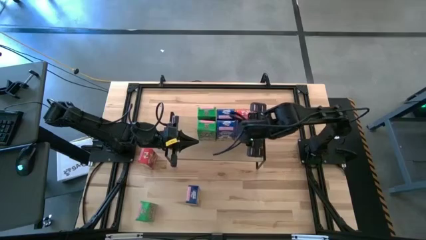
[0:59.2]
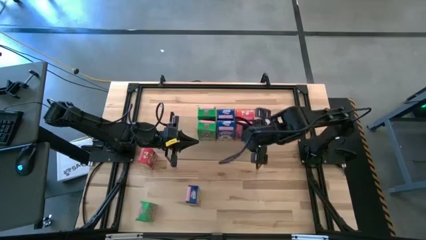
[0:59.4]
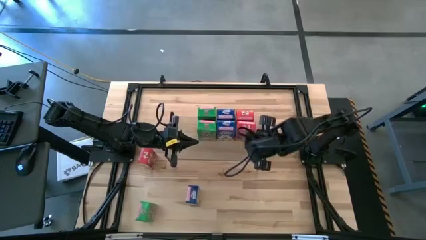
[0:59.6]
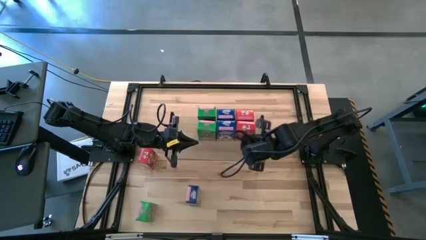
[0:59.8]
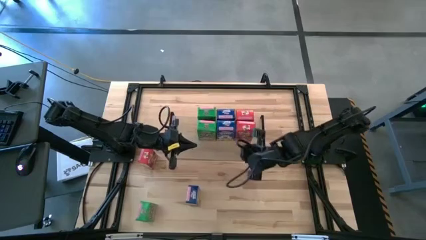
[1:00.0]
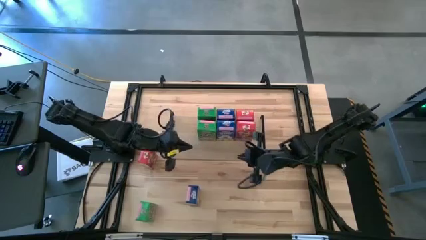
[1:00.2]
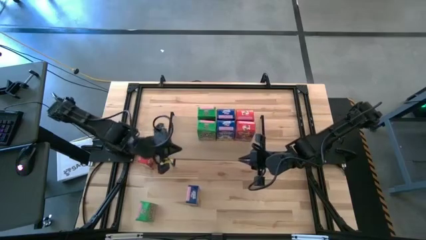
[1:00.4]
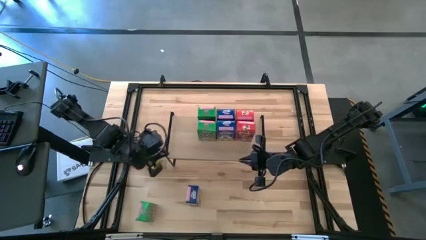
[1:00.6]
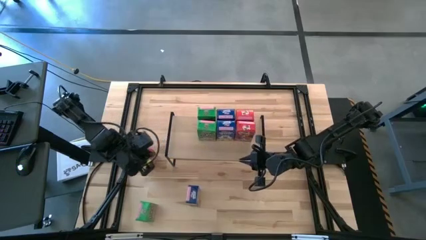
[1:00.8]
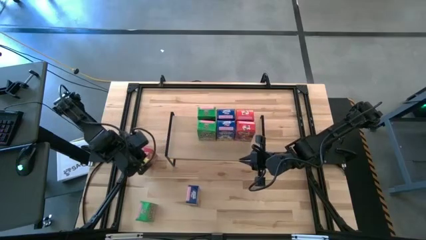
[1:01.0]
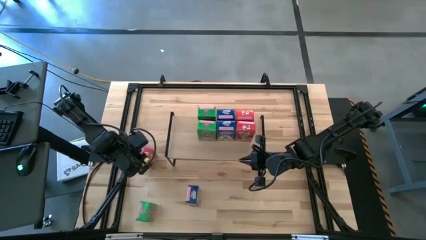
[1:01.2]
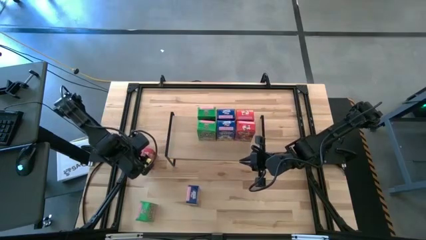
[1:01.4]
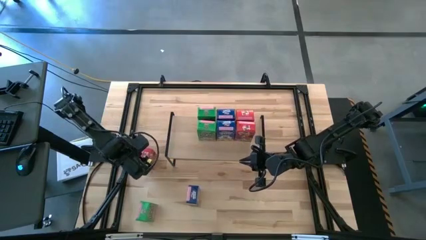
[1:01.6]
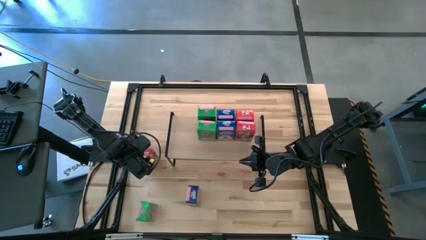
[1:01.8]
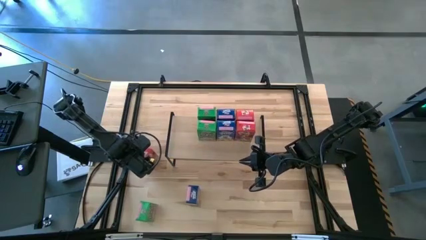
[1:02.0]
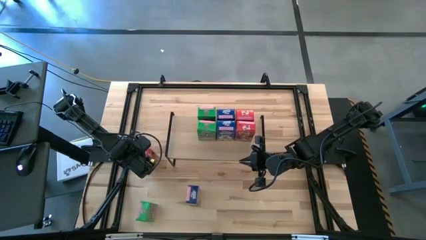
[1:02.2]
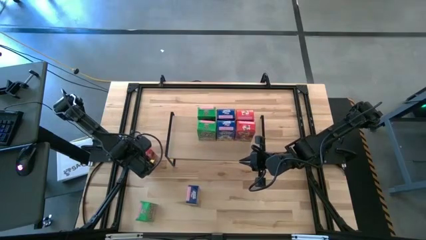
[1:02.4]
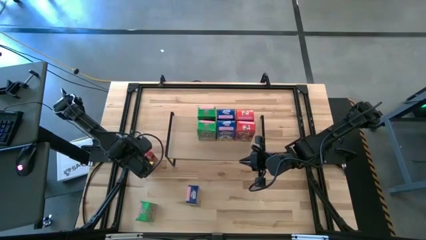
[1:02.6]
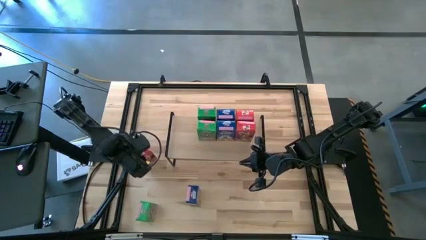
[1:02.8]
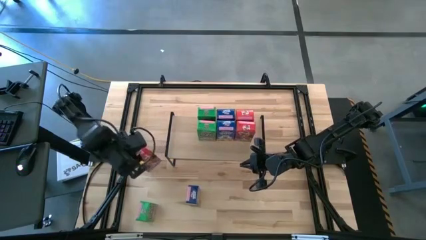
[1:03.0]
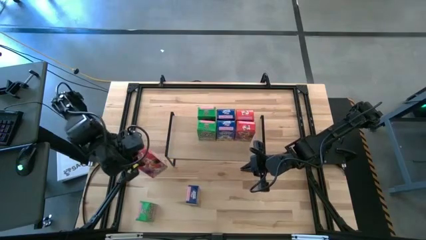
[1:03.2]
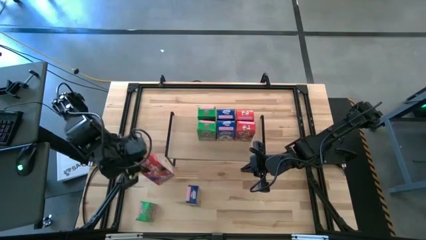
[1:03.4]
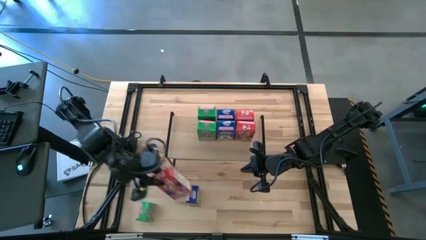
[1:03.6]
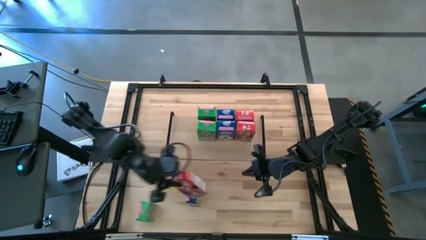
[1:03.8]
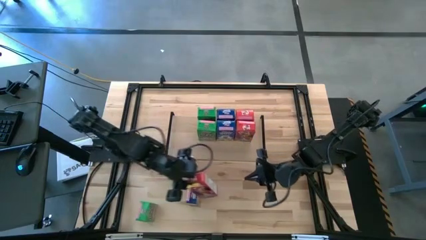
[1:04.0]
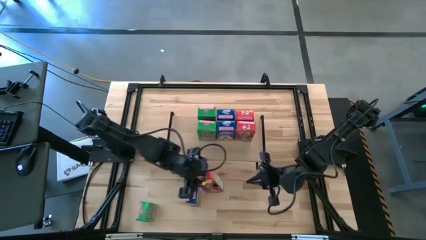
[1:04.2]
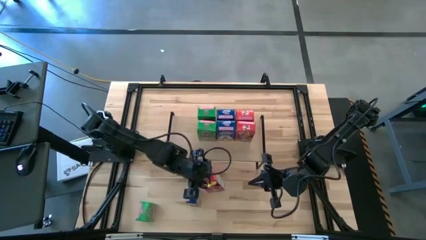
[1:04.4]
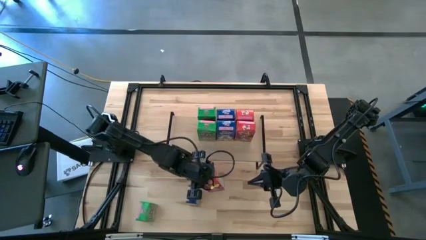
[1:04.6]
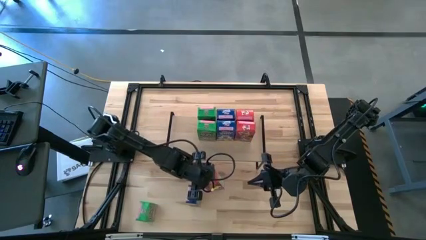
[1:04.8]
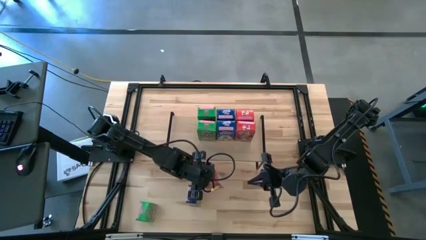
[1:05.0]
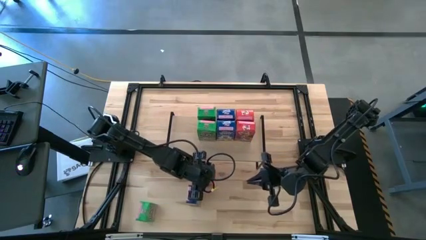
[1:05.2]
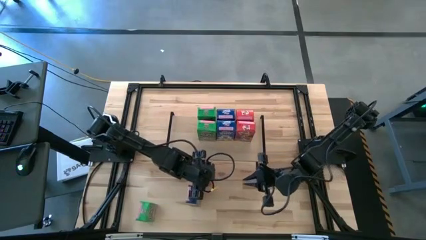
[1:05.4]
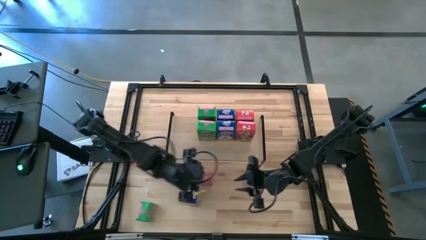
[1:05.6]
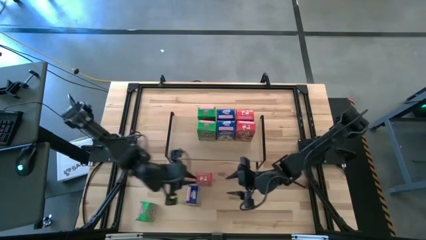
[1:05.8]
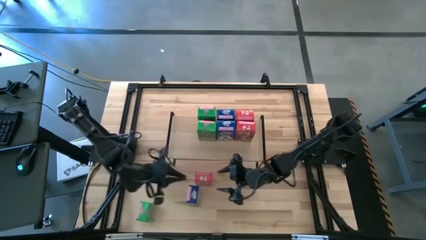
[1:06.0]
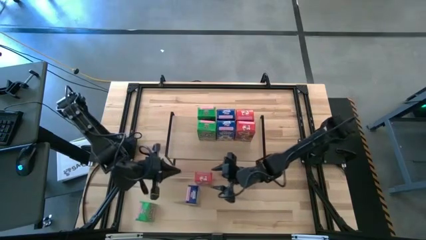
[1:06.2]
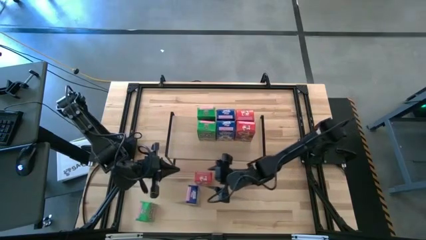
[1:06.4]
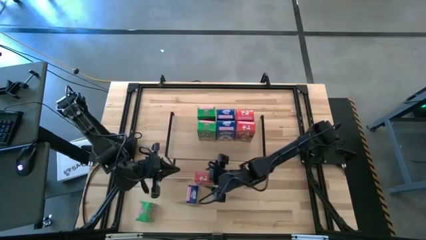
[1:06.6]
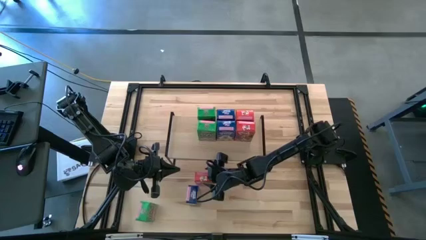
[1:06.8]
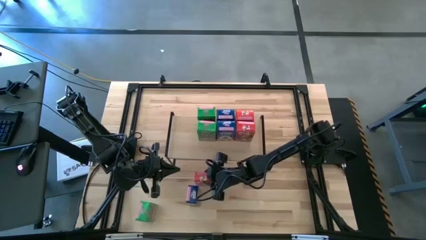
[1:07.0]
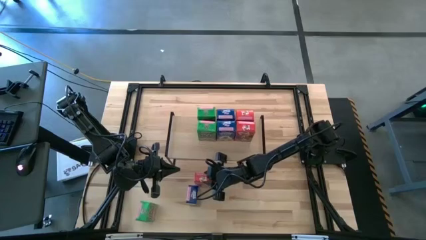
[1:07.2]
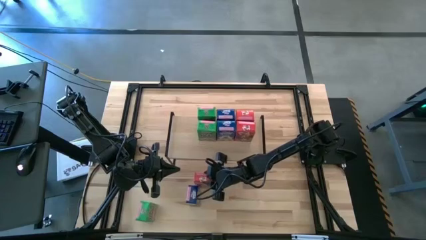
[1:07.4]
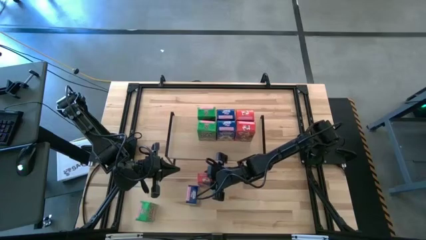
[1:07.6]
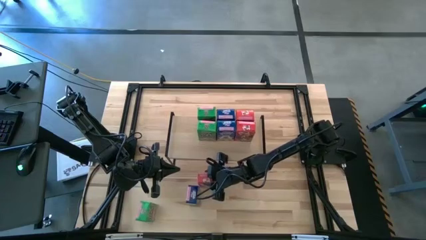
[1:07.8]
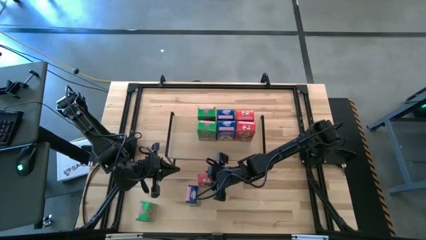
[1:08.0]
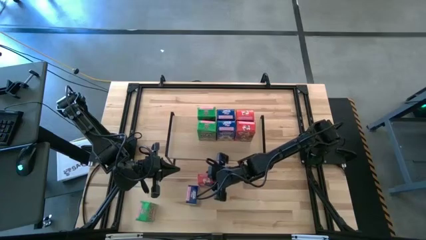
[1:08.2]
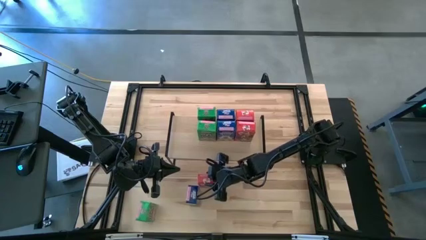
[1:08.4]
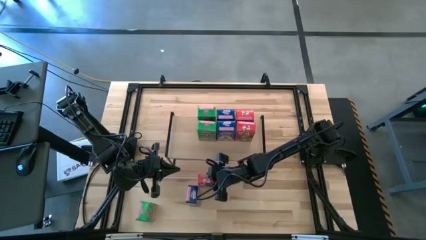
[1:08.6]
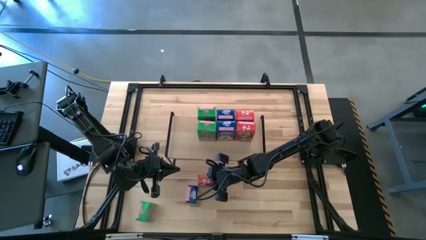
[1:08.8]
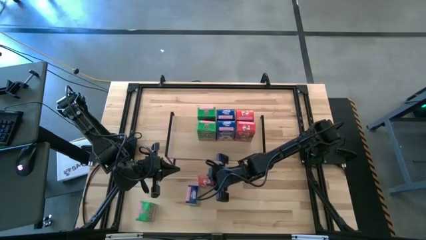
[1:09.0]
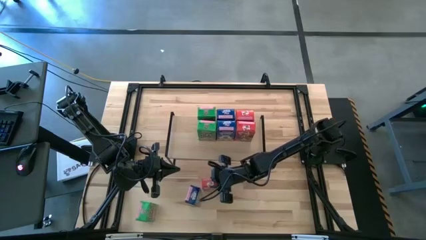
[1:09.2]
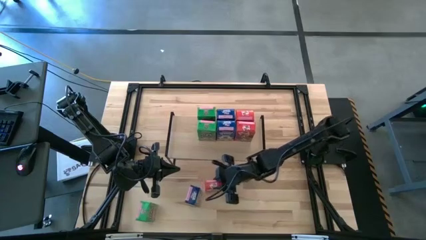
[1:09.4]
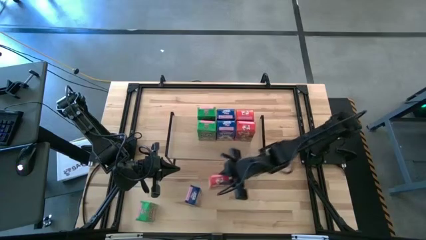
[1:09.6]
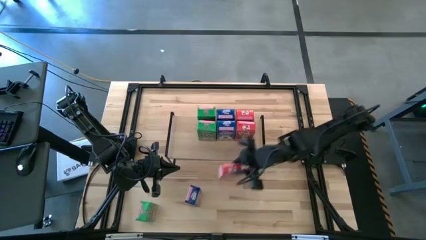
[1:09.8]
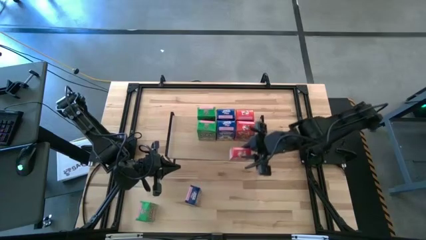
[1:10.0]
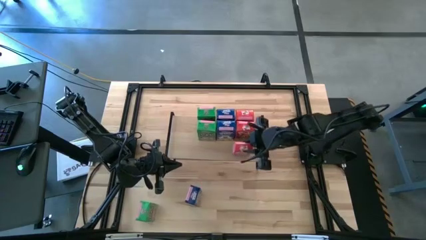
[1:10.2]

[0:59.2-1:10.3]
Task: Stack cereal on shelf
Put the red cereal box on the shelf aligned with the other red cereal box
